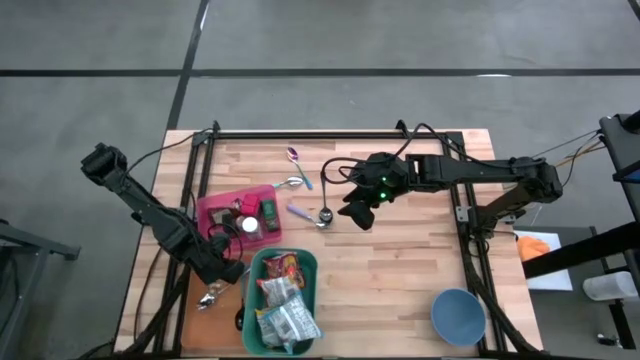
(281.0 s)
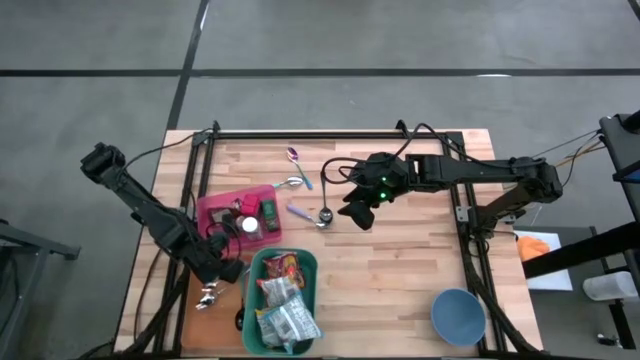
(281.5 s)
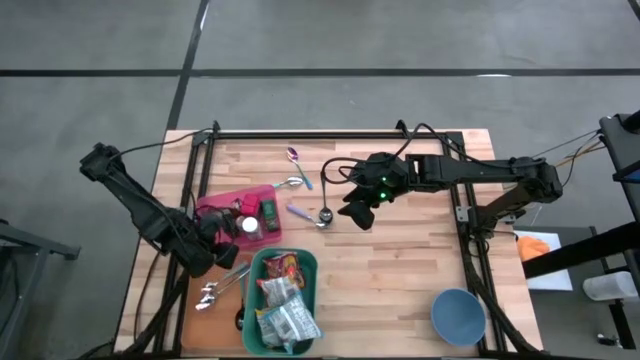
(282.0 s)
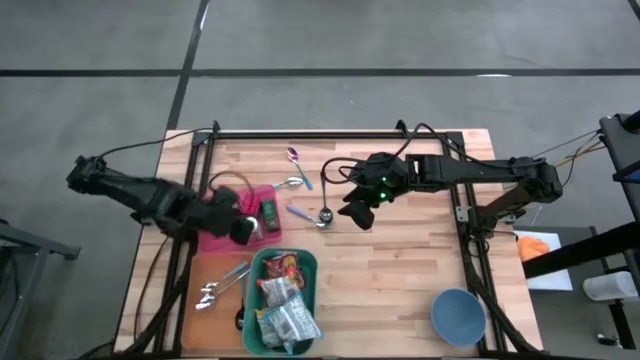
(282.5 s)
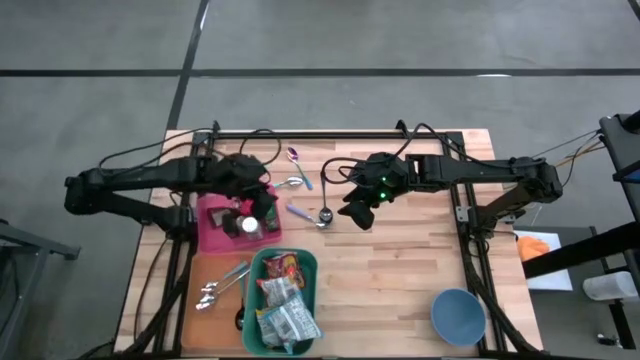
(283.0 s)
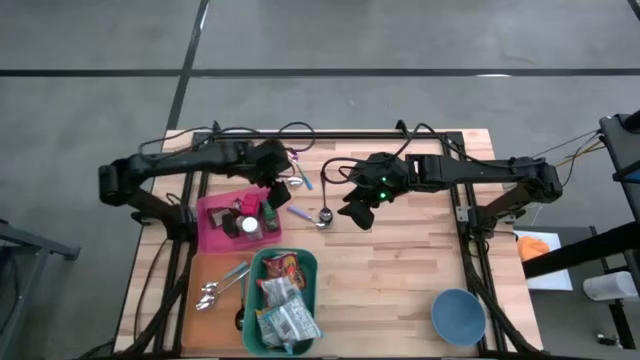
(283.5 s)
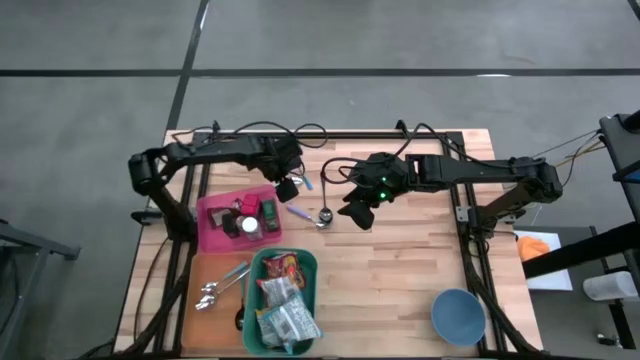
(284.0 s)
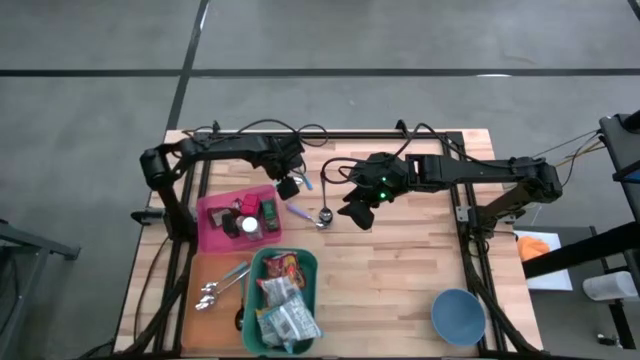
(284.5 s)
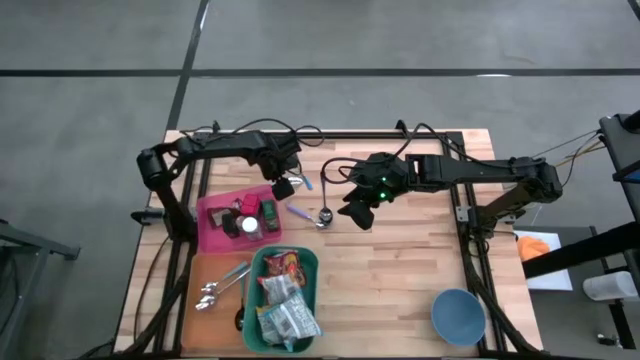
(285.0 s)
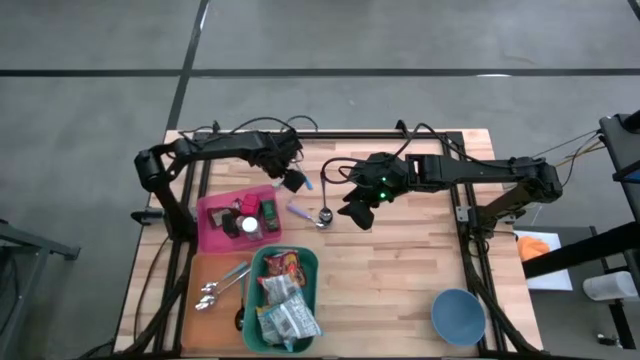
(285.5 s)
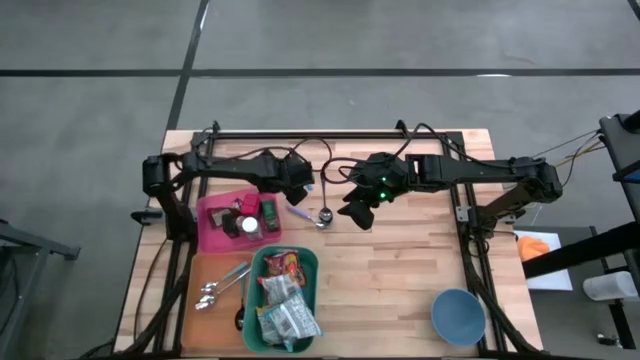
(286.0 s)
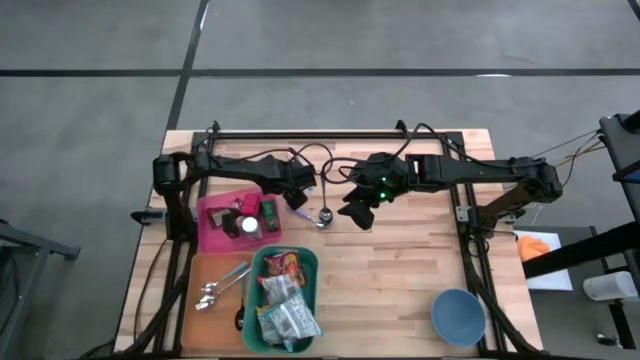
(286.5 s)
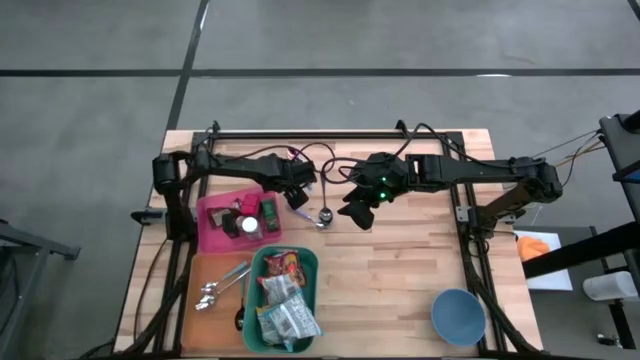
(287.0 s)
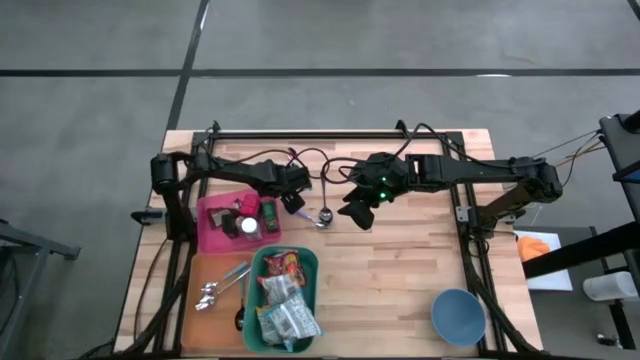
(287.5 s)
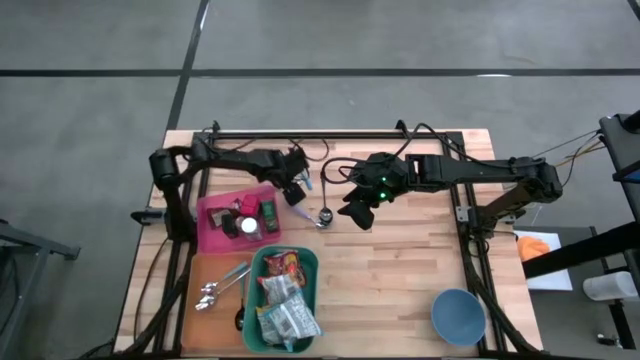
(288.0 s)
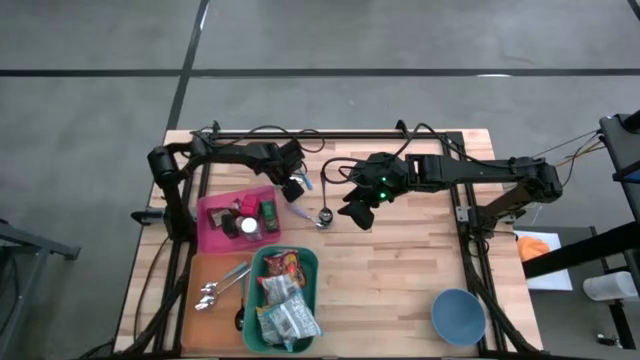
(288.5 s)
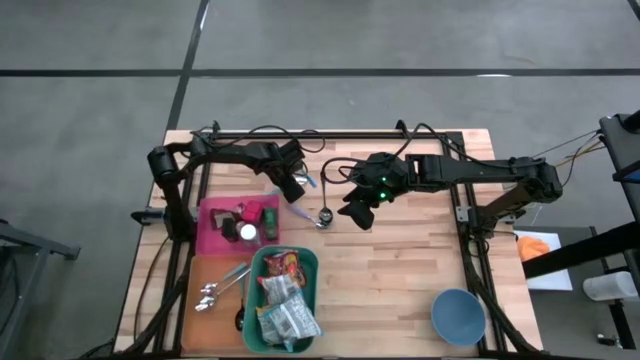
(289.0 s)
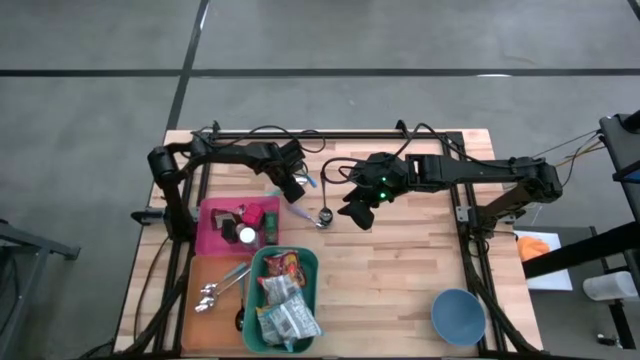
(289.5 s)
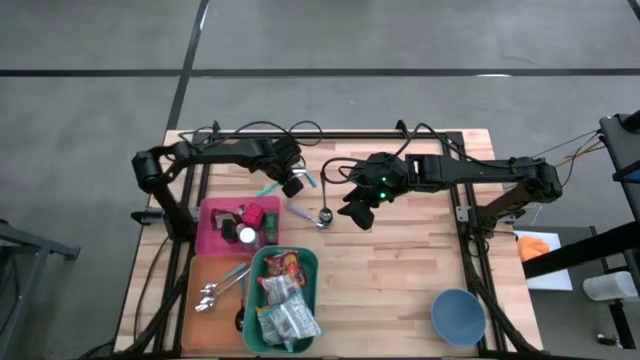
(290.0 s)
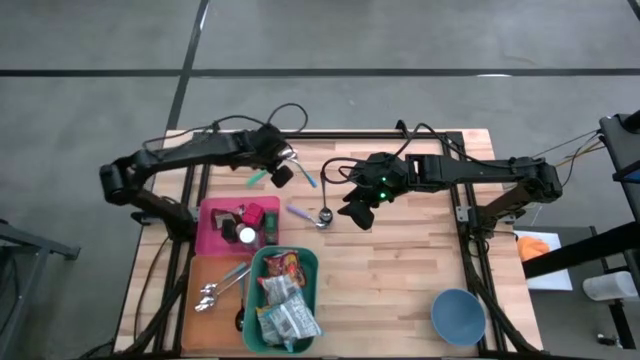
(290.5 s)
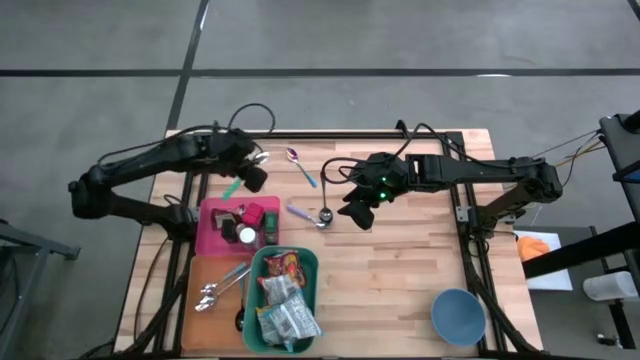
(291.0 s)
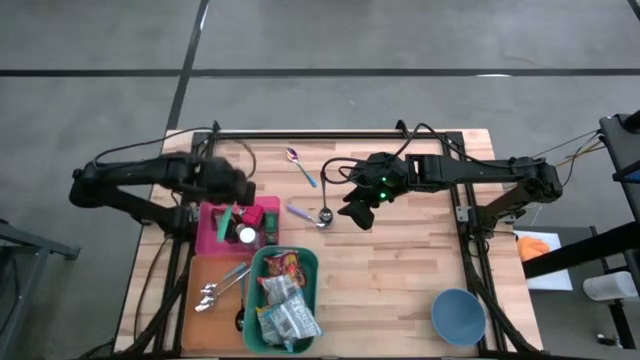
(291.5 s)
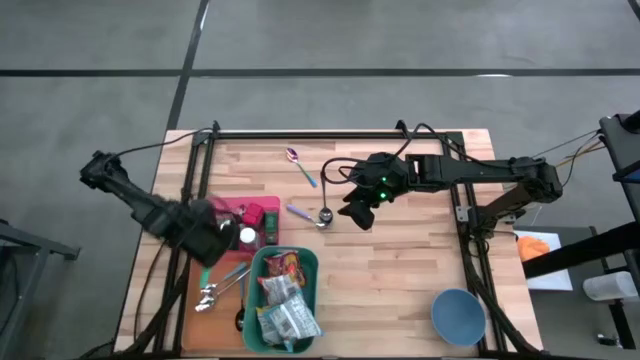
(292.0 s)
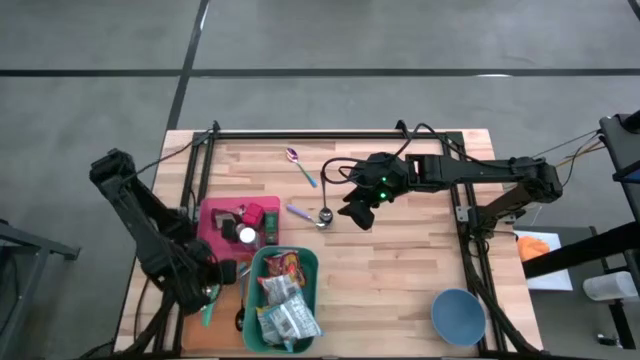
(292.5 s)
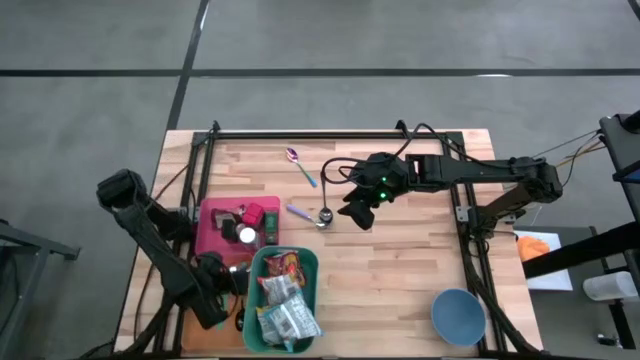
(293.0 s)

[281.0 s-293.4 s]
Put the light blue spoon into the orange bin
